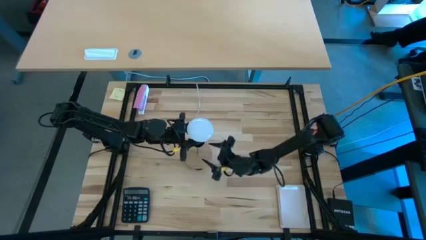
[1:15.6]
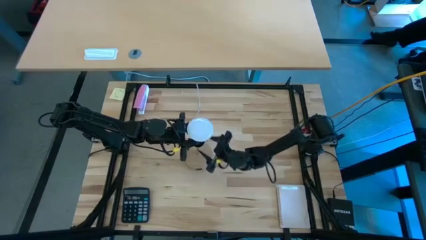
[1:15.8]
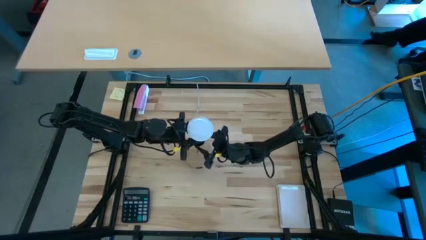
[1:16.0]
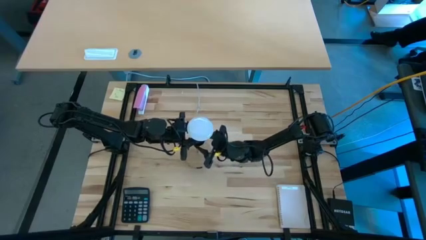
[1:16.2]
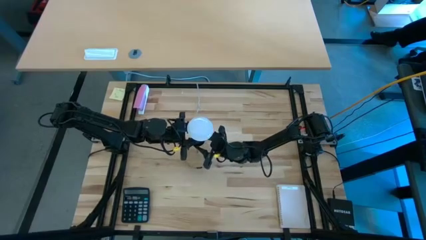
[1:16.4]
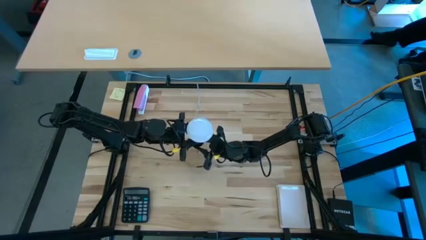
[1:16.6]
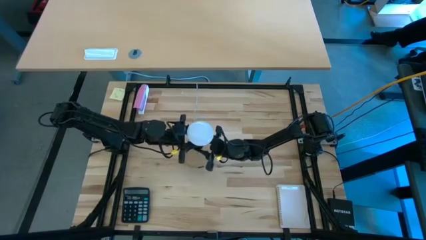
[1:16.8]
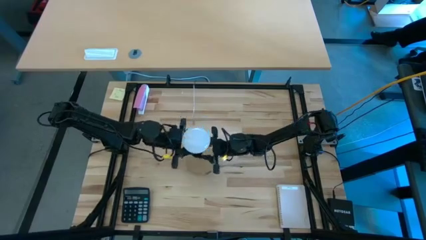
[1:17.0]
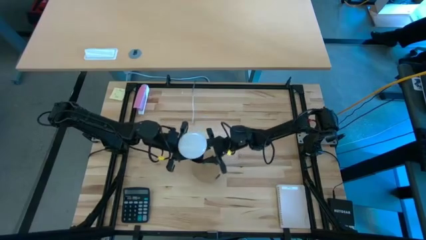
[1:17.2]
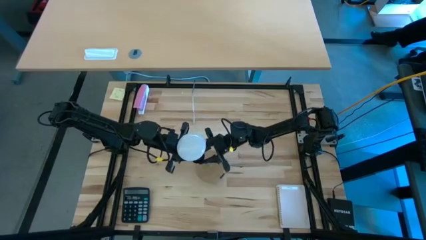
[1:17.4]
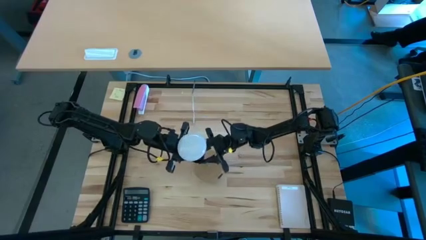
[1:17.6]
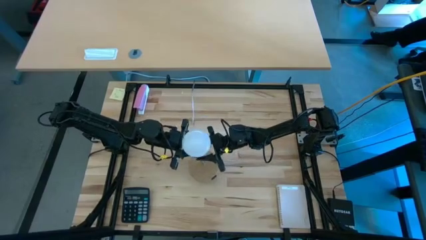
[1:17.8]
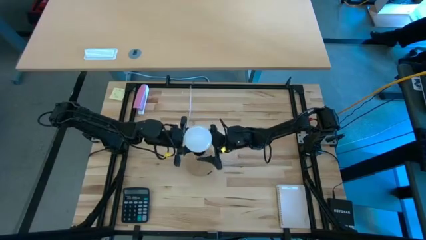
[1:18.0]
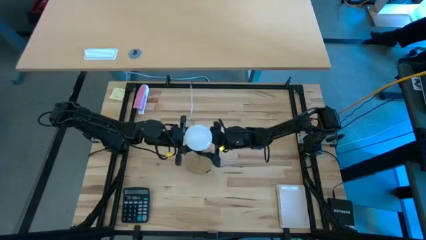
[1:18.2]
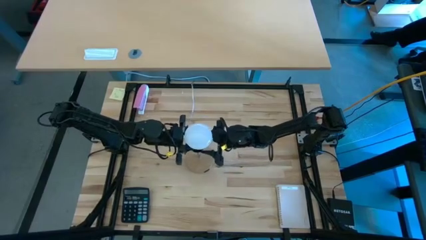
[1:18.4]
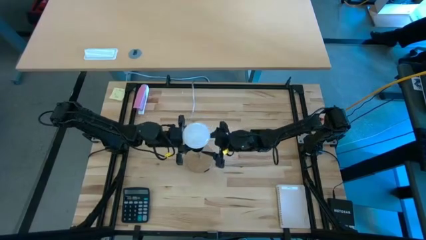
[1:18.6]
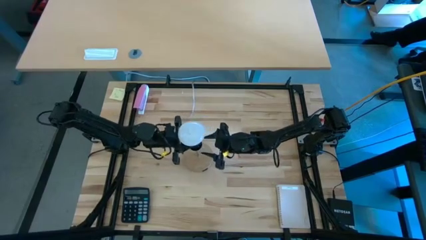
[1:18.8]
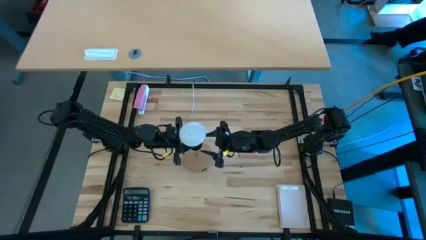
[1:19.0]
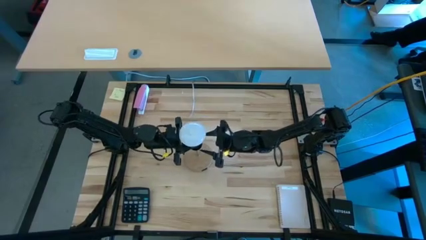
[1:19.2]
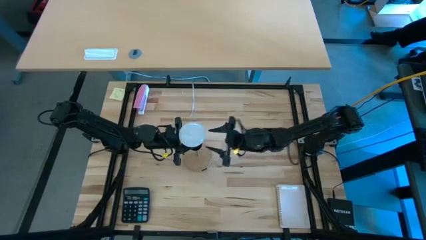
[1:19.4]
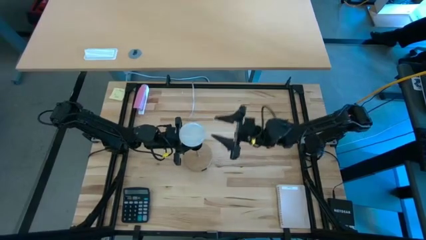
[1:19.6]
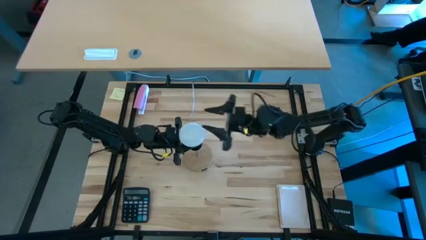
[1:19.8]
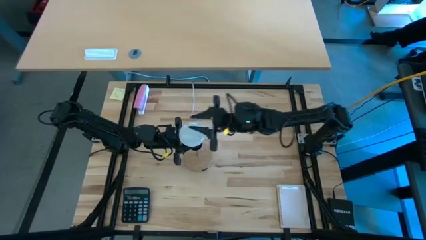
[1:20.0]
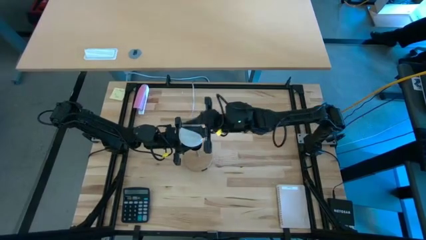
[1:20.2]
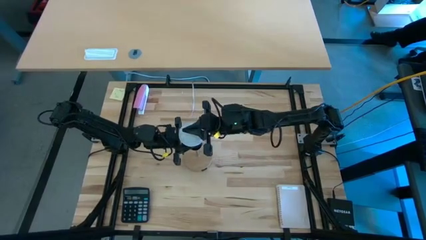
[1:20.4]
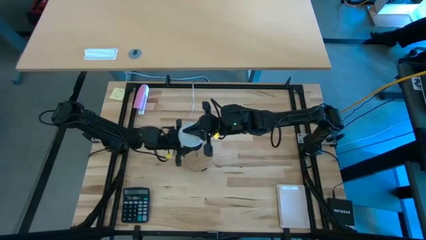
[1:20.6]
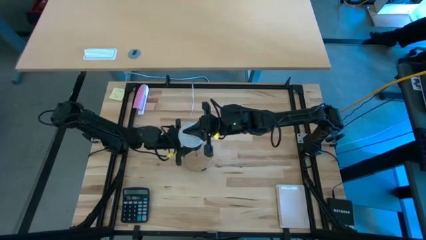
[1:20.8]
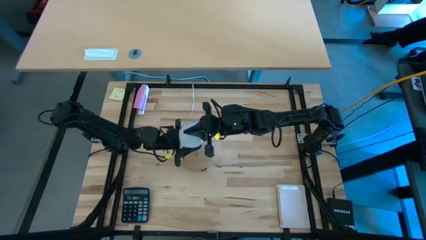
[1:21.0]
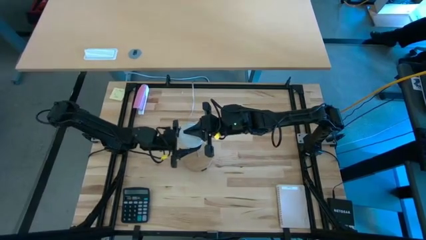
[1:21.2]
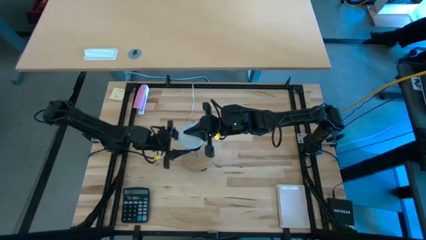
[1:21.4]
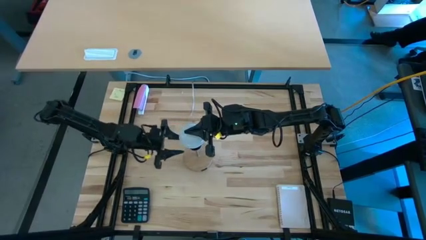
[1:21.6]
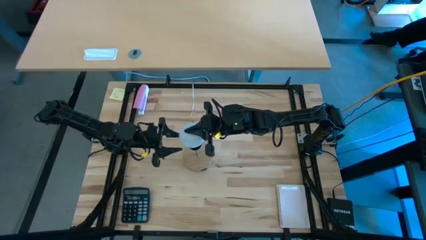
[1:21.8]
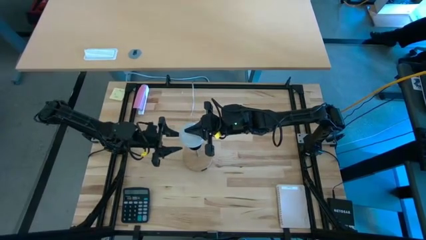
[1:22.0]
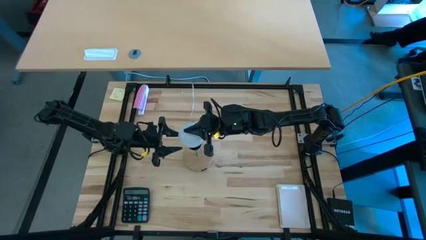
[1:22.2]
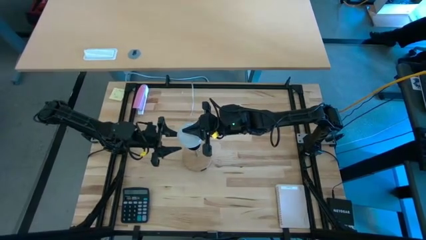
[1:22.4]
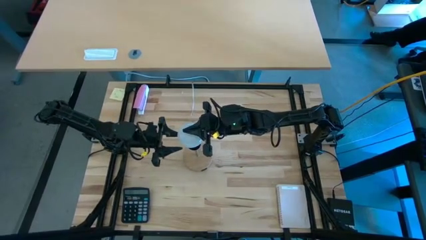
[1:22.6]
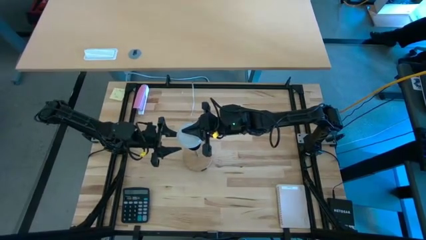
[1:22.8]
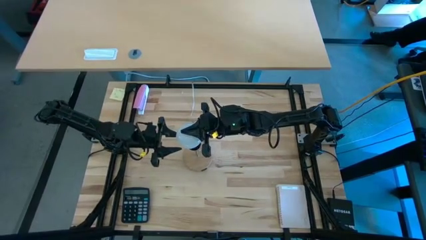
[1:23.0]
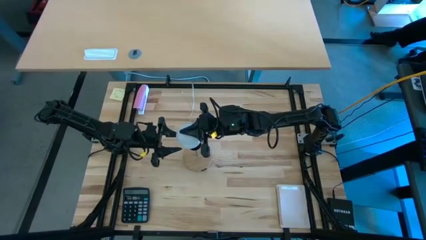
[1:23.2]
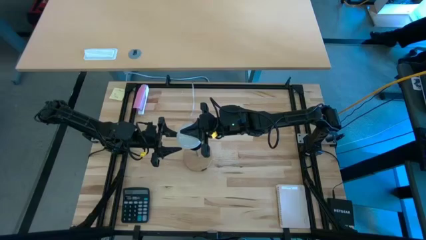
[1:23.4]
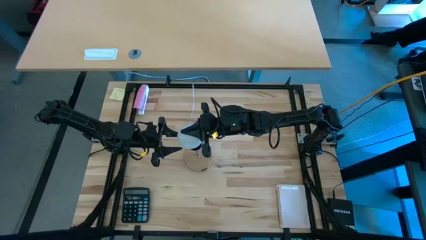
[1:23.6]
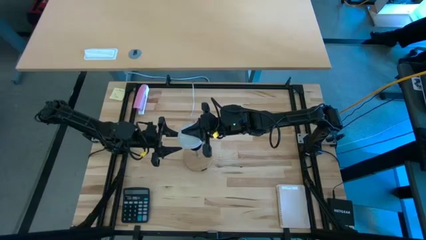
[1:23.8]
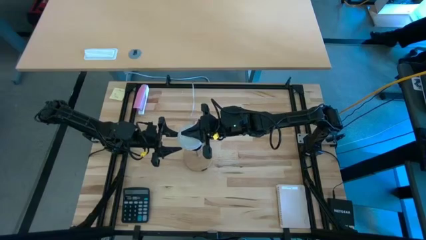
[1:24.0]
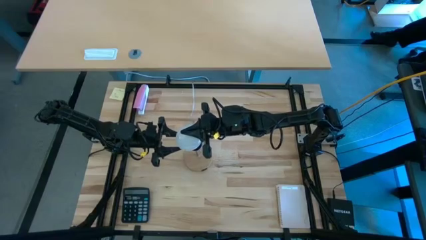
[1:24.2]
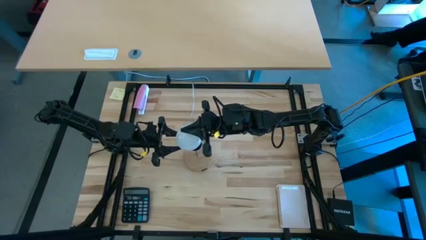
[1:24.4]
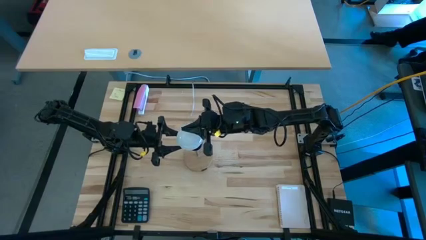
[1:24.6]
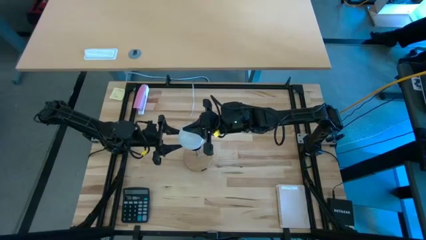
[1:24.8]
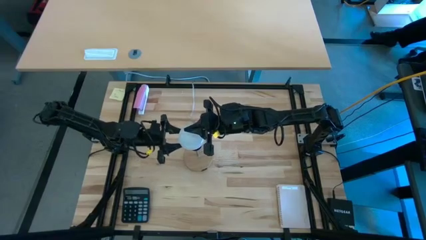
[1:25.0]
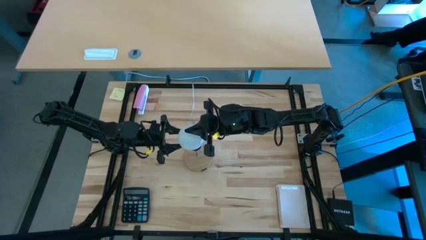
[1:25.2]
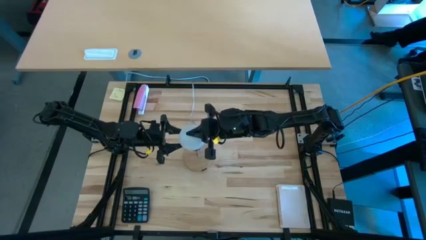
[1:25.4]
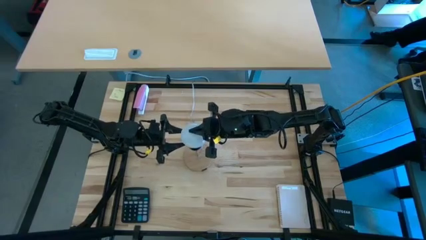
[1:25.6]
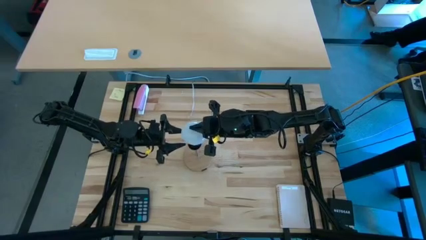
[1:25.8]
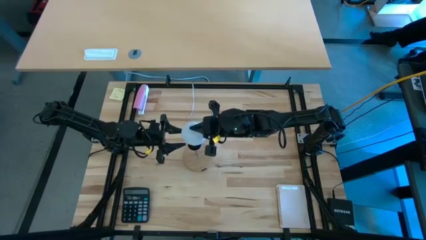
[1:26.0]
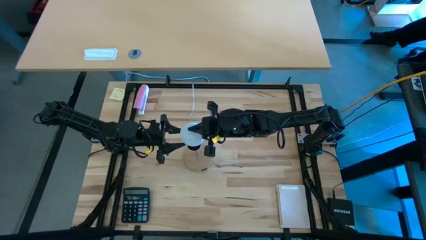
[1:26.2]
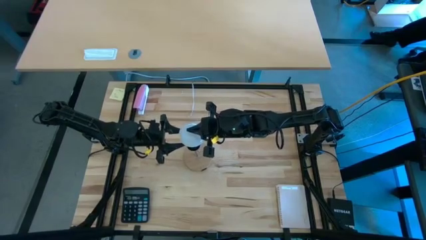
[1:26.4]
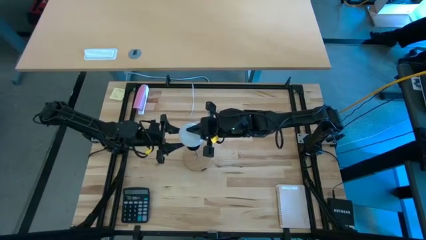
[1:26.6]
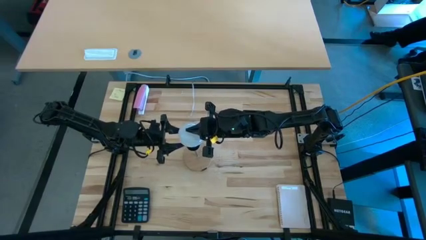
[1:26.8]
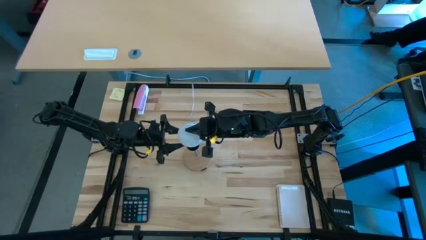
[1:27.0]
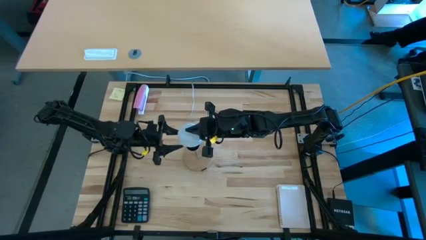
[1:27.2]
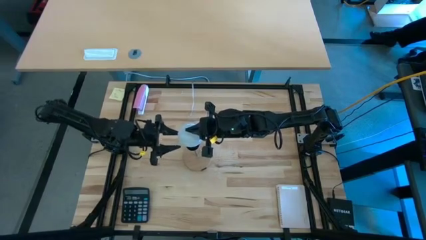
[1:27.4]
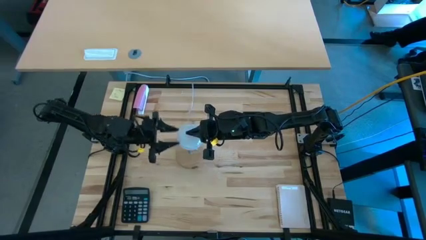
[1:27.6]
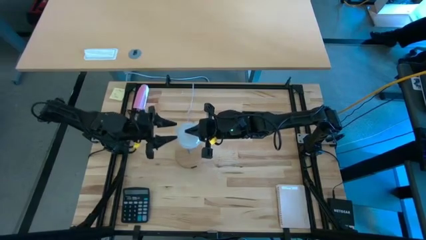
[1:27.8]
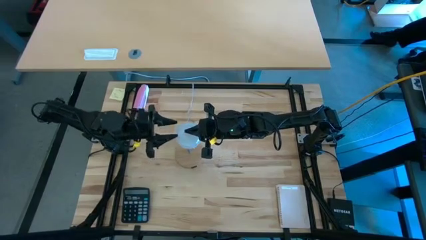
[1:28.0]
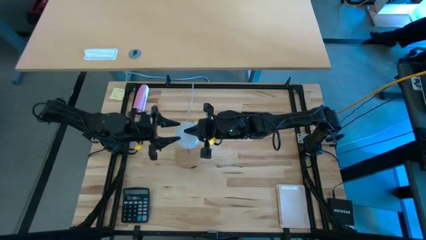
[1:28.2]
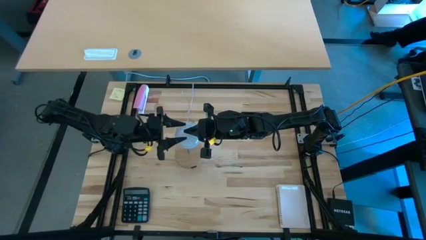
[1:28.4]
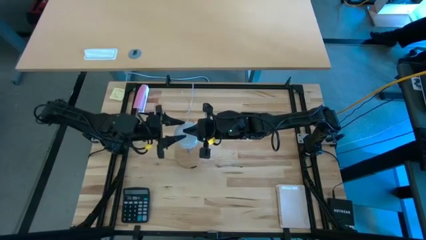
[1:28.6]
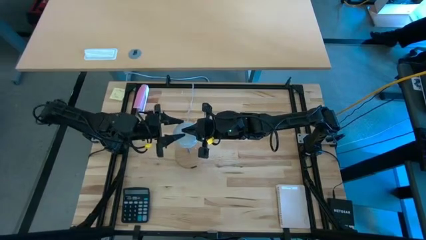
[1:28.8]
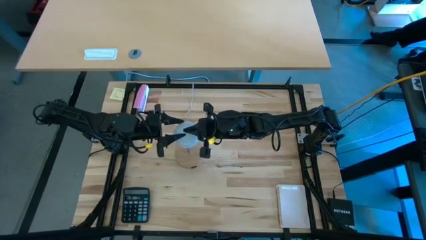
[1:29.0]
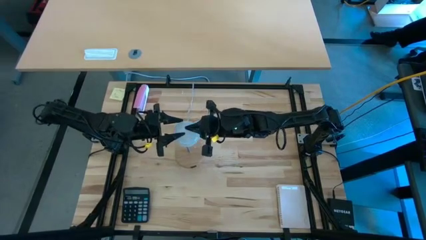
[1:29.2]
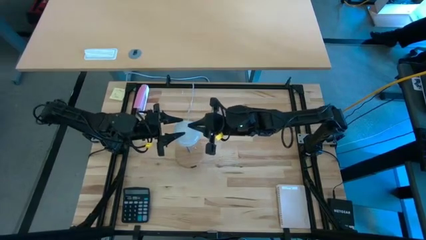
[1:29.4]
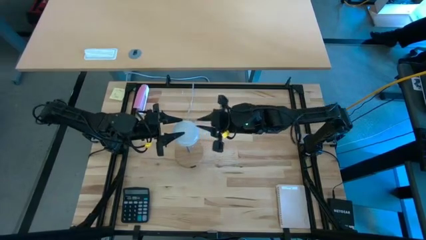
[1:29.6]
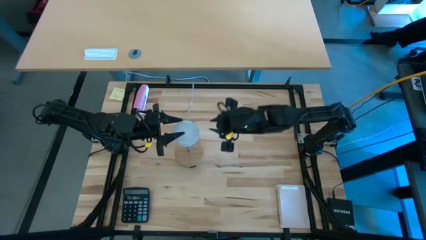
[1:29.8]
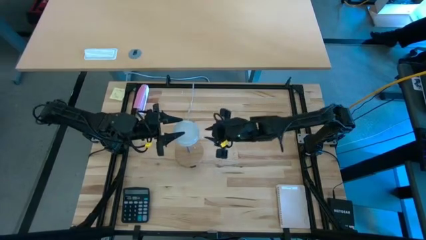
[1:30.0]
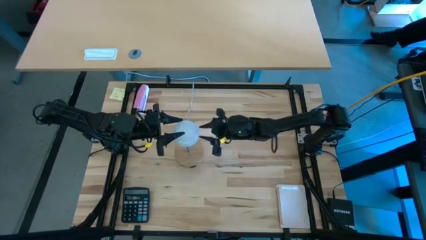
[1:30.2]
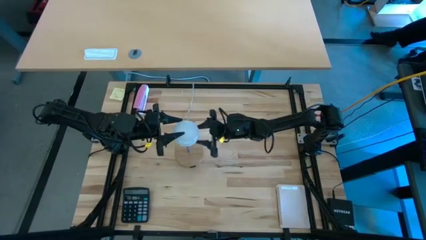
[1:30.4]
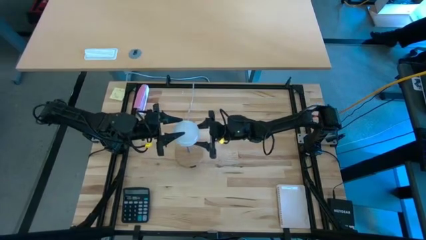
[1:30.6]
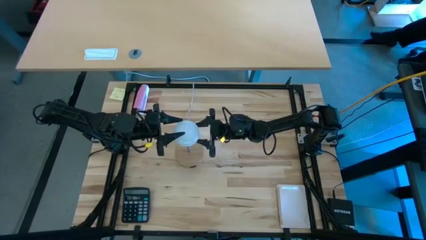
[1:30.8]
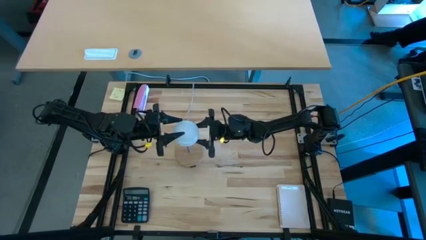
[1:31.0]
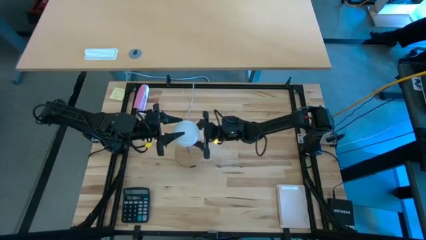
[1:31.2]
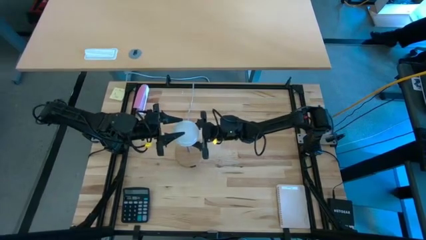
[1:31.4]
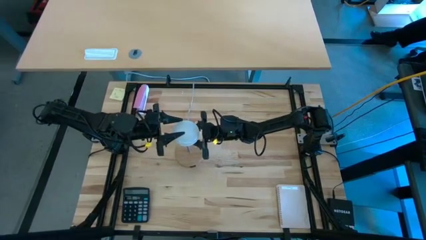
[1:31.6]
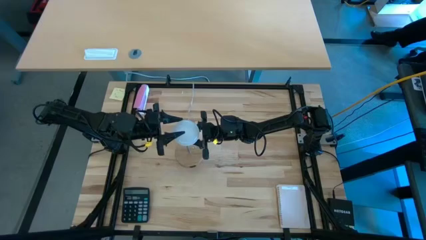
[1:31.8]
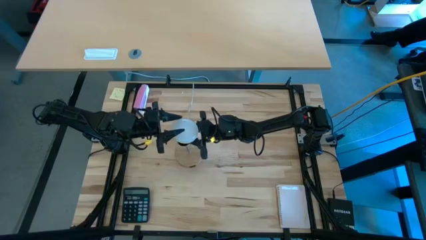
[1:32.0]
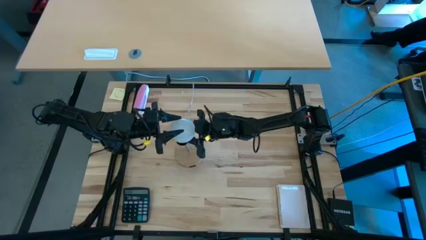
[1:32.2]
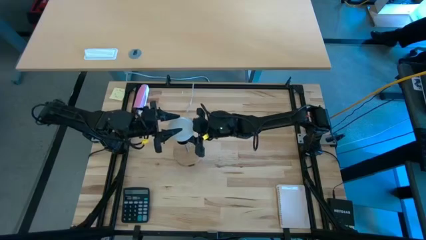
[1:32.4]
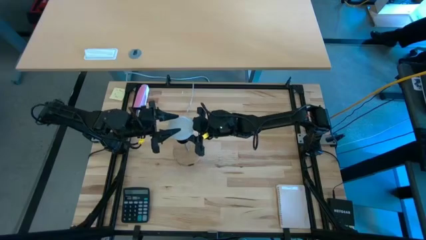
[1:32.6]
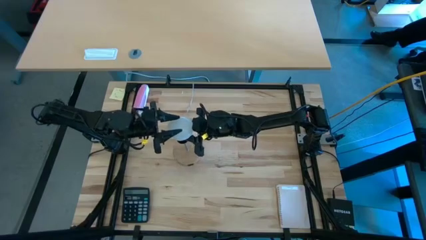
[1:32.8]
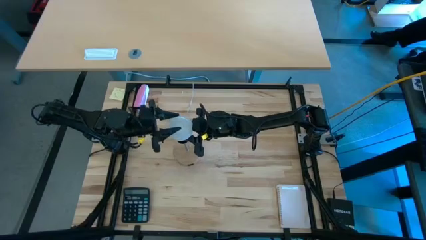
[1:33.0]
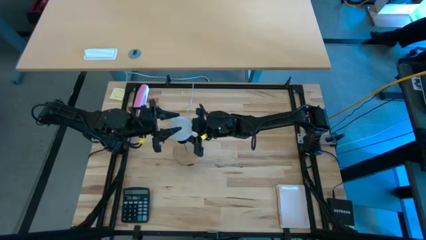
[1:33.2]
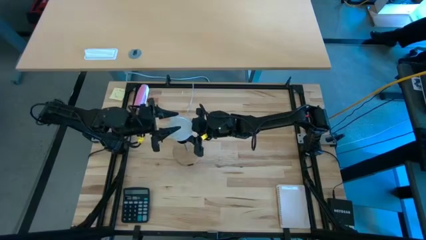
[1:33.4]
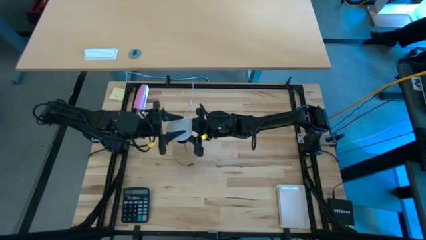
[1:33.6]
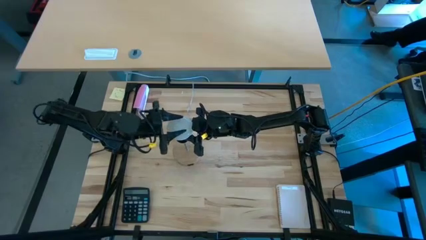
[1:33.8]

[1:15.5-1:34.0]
Task: Screw lightbulb
Insert the lightbulb into the desk lamp
